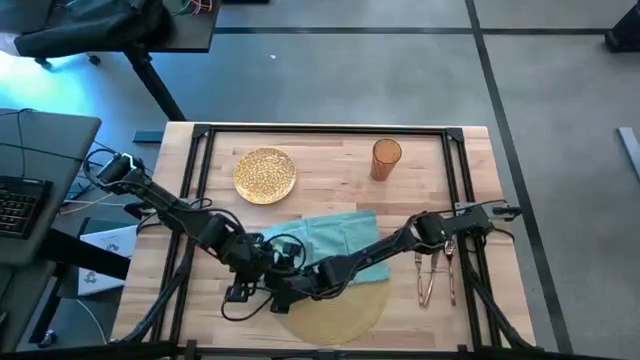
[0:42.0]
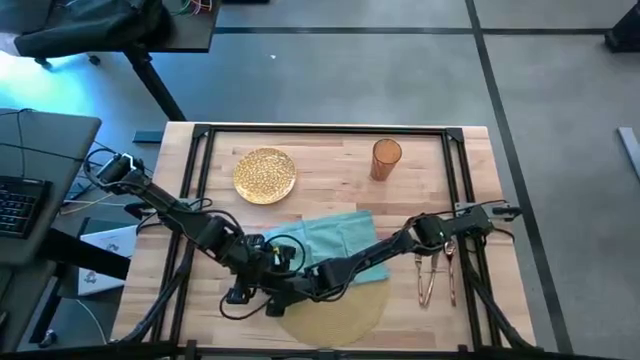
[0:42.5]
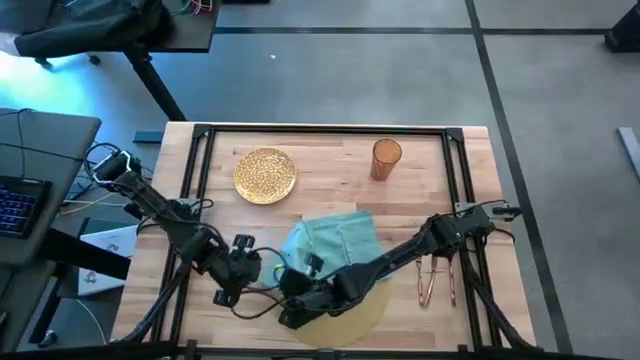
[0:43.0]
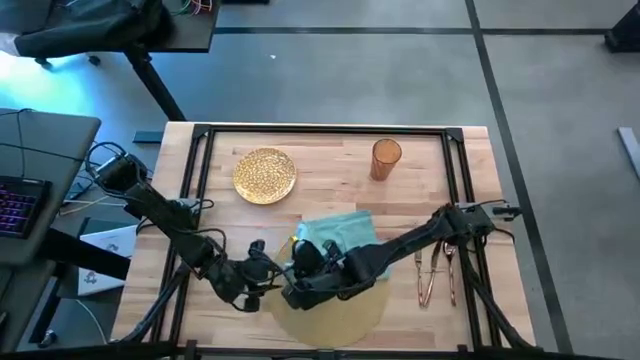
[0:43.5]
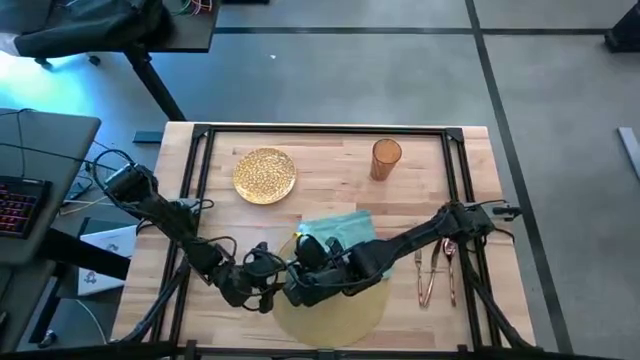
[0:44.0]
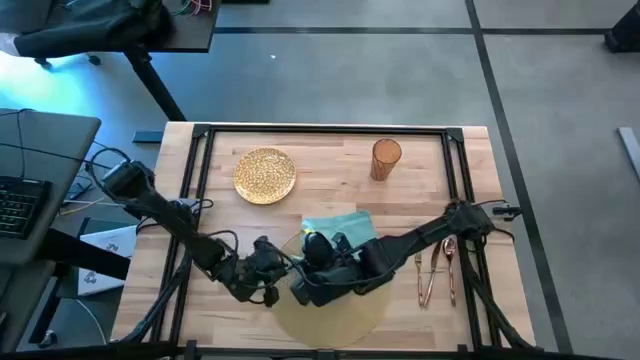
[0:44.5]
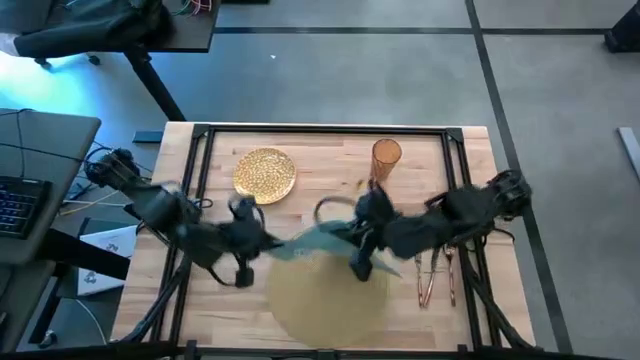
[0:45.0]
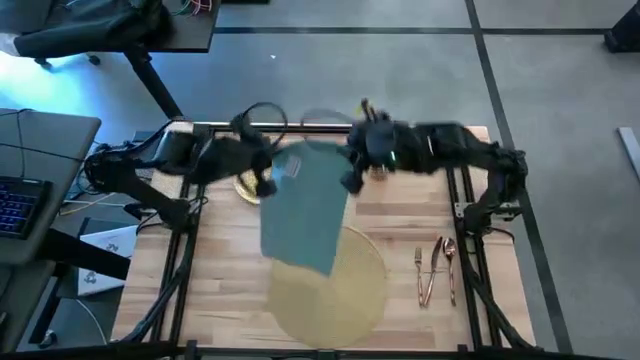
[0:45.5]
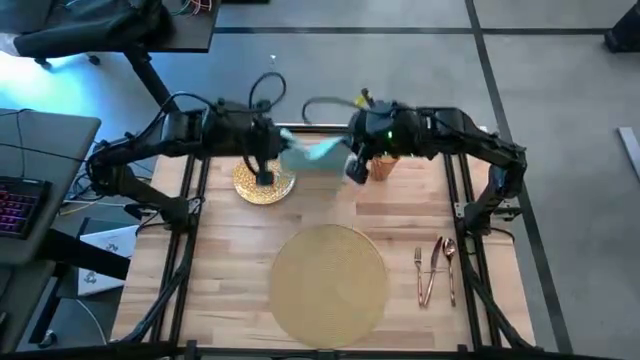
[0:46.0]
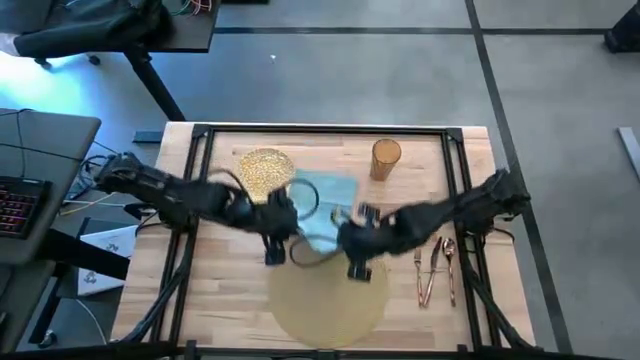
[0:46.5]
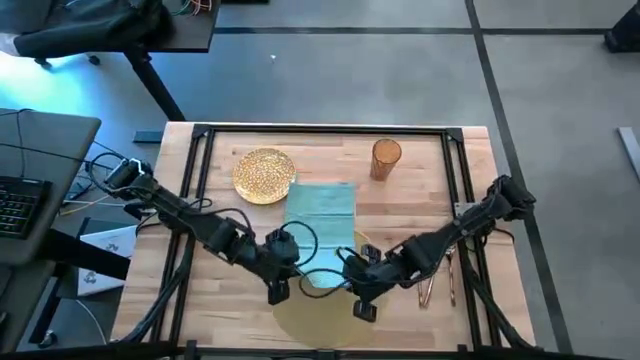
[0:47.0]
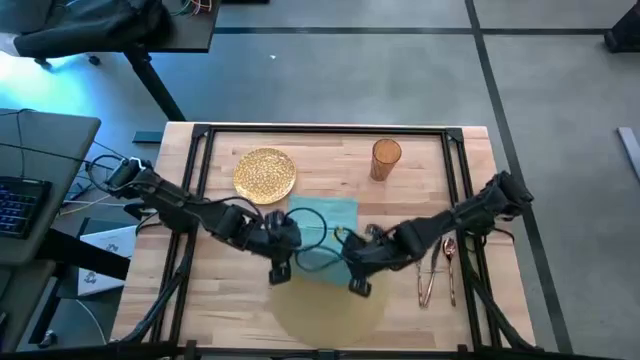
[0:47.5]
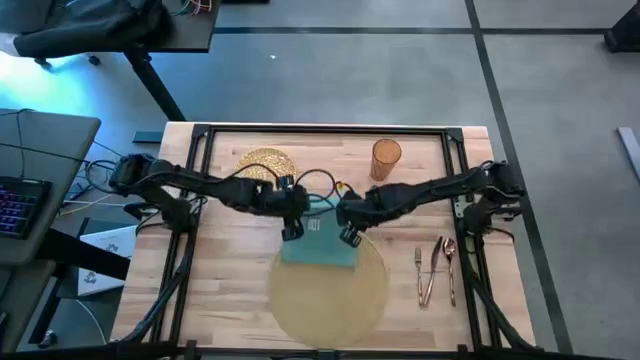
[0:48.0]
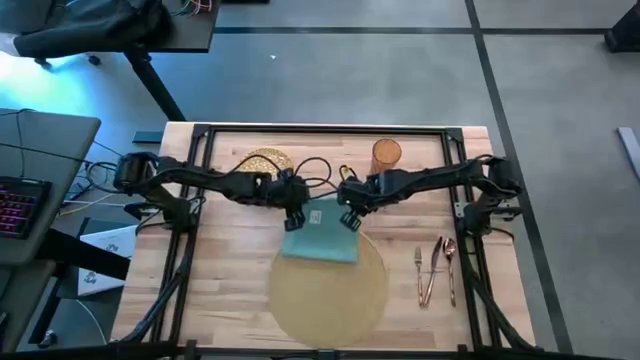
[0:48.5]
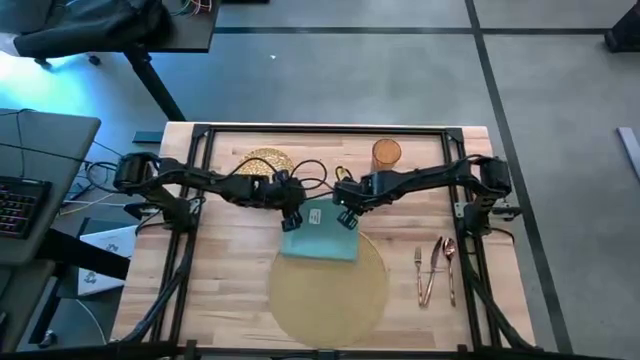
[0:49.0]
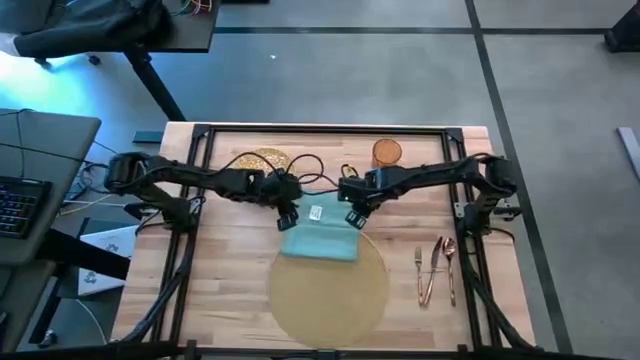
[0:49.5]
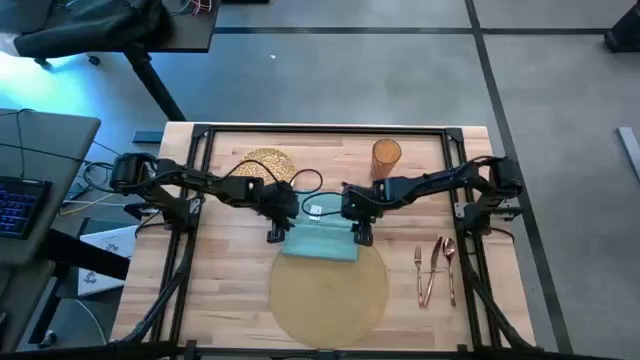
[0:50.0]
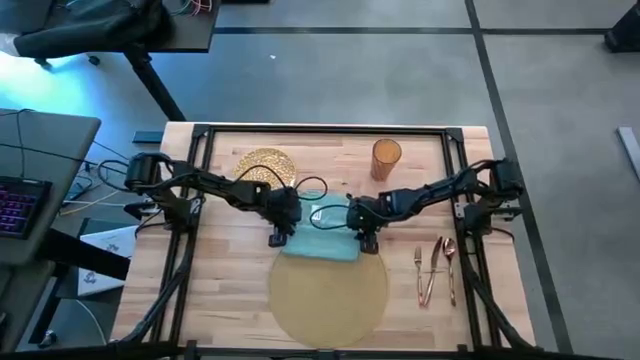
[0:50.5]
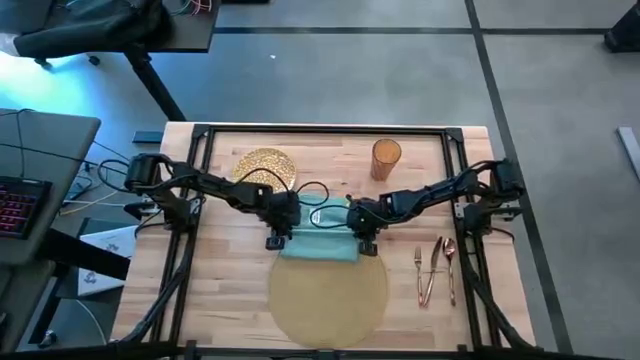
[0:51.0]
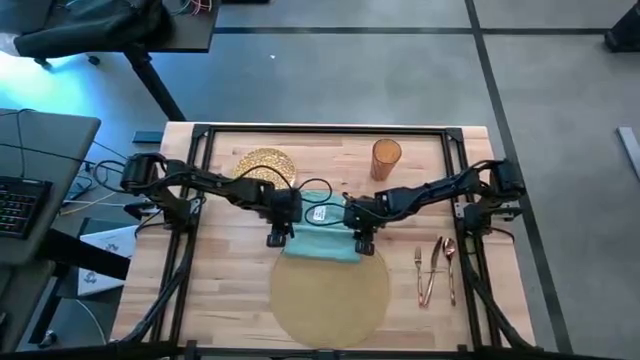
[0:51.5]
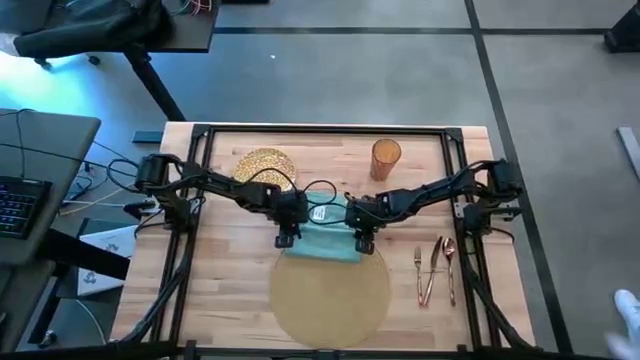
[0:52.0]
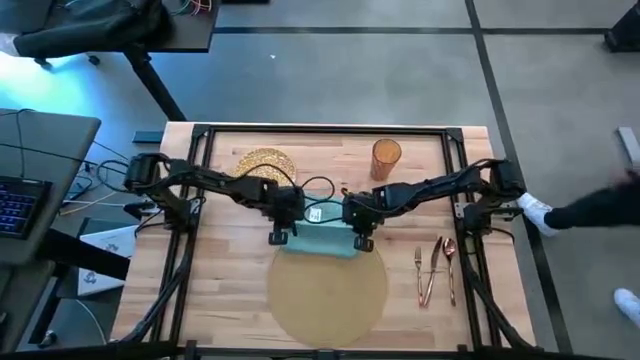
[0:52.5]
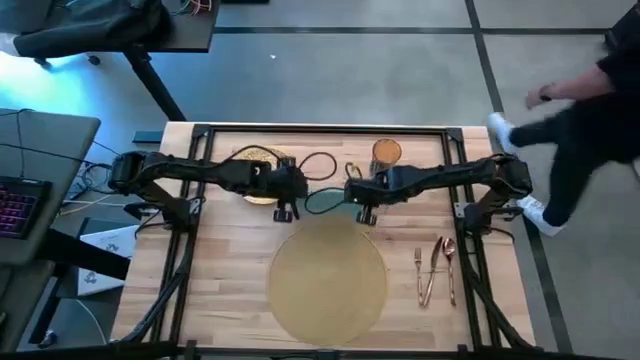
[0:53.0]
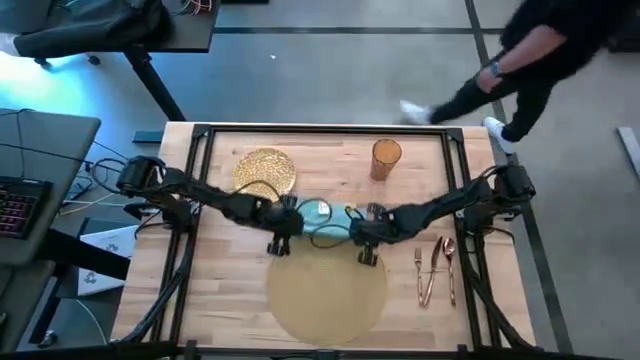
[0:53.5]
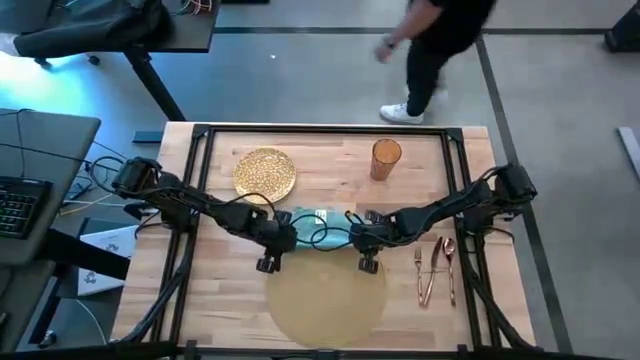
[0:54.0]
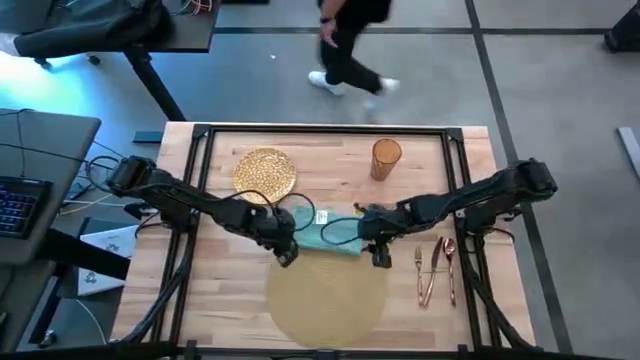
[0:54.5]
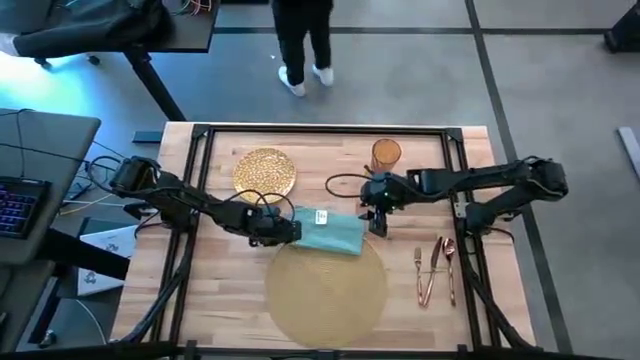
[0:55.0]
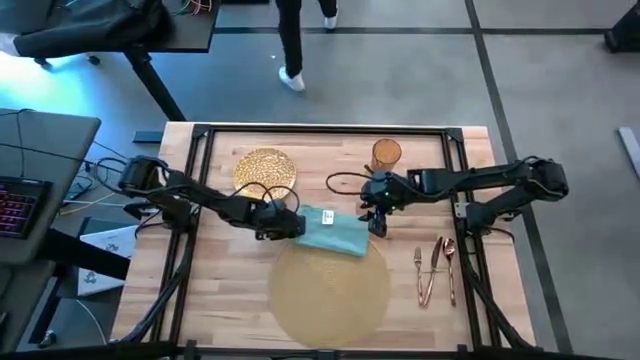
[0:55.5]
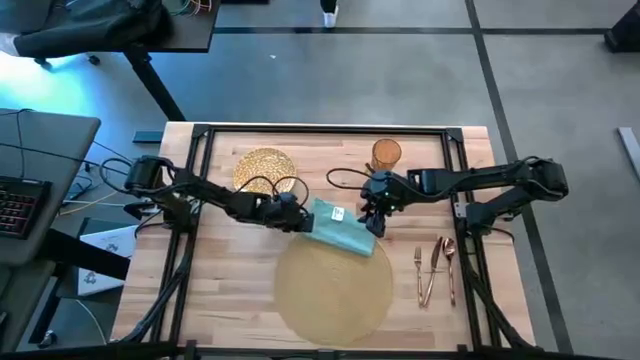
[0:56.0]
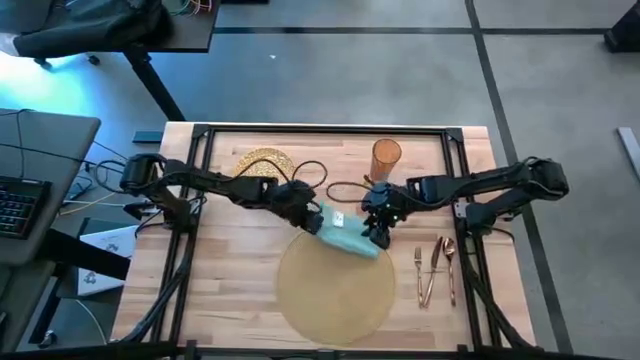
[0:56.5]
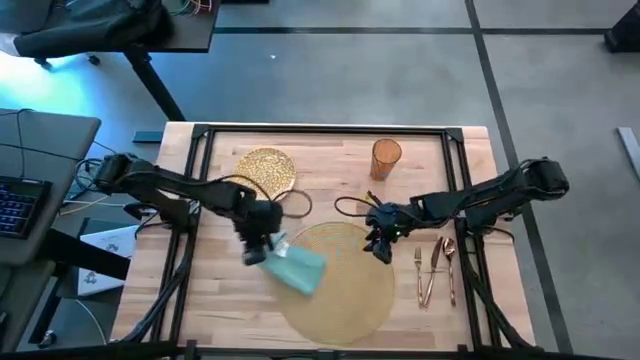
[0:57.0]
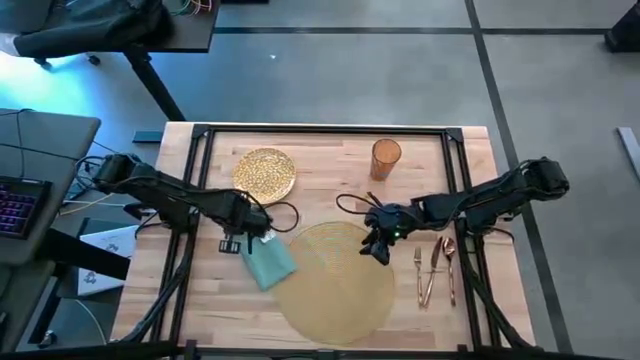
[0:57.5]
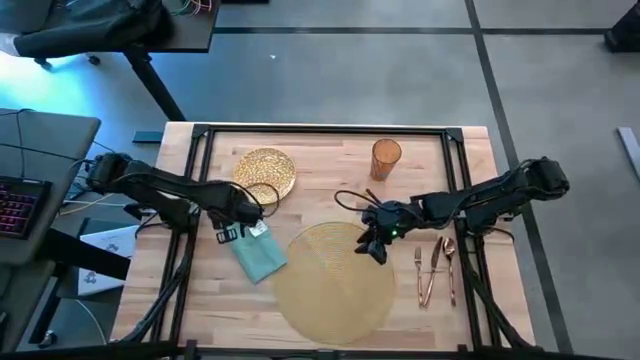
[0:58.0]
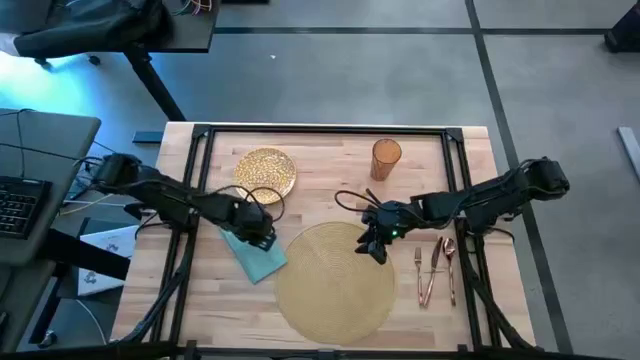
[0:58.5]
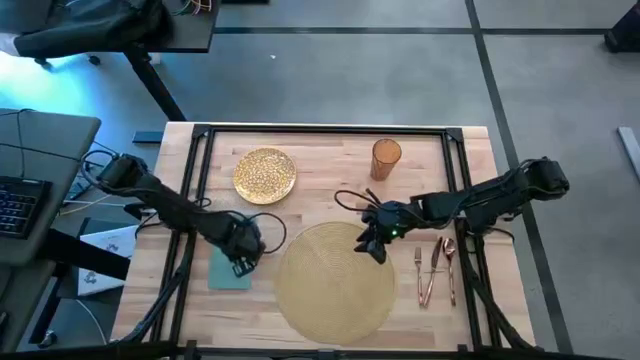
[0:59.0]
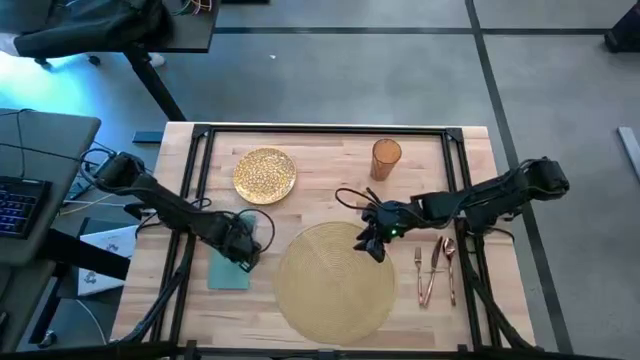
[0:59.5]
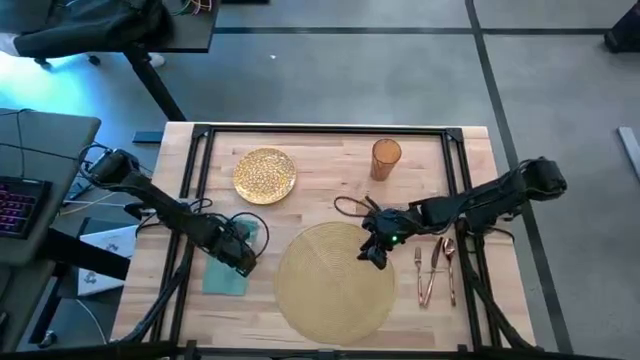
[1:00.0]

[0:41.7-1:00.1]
Task: Set table place
Fold the blue napkin

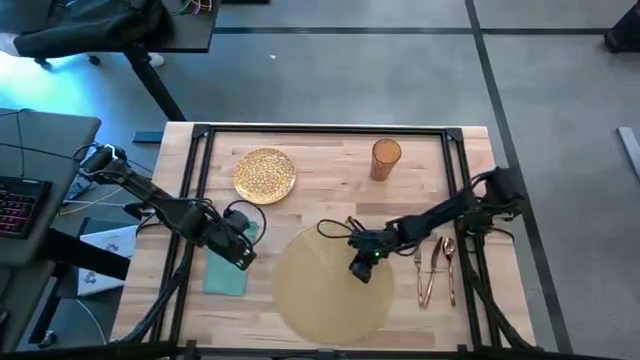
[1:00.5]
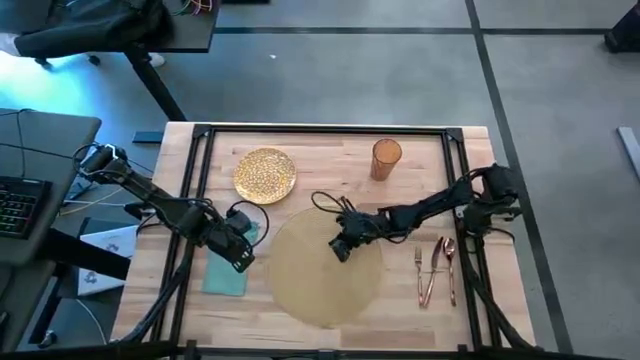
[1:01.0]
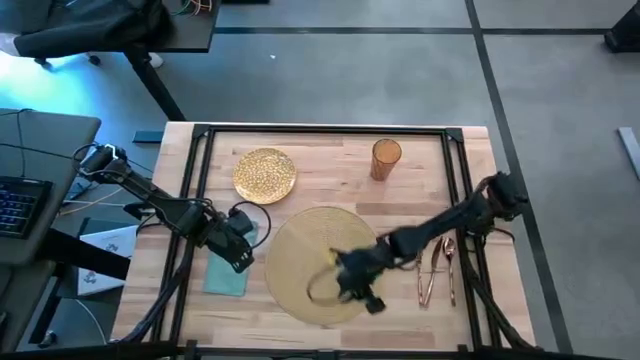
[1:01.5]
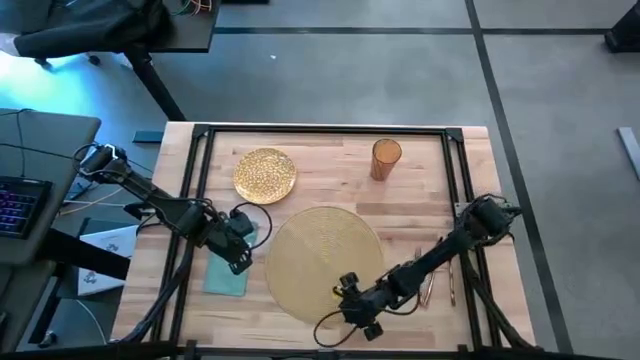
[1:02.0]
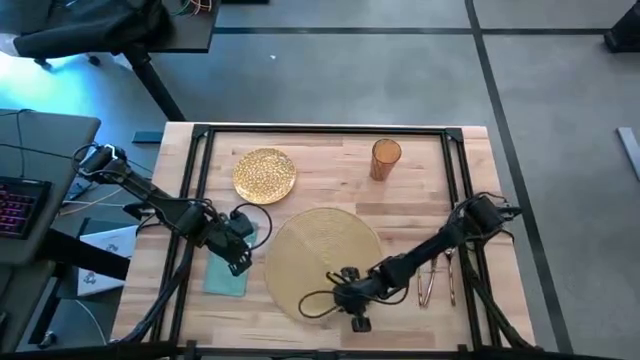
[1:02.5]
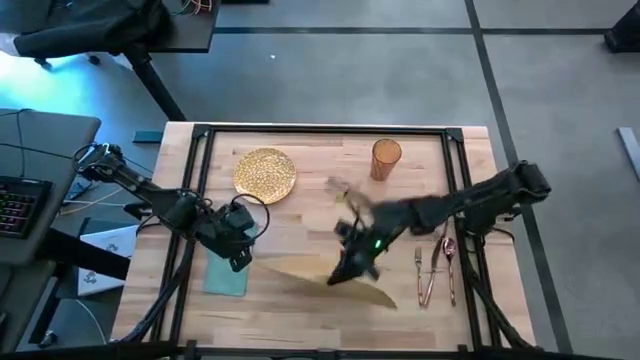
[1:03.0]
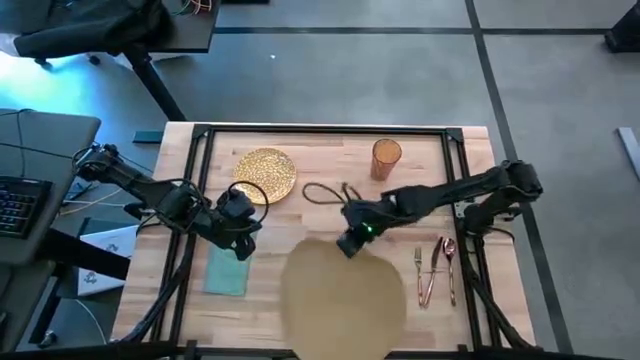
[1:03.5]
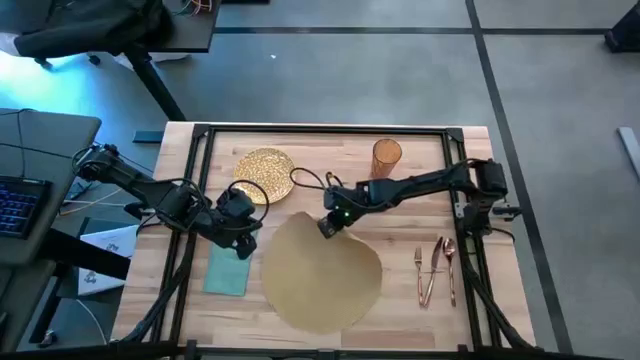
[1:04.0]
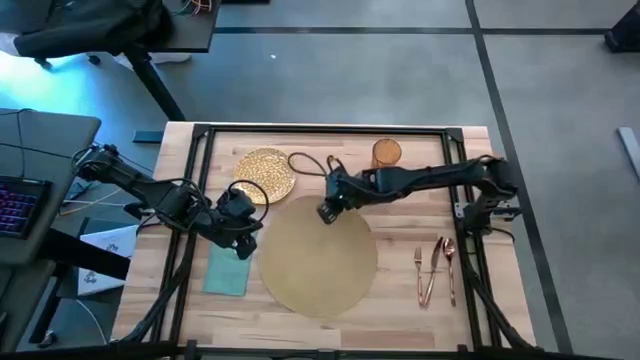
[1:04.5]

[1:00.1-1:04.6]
Adjust the mat
